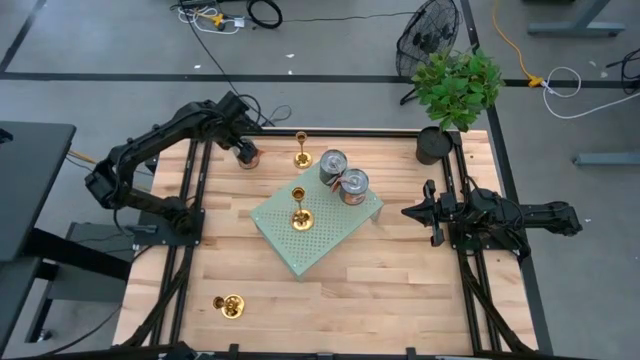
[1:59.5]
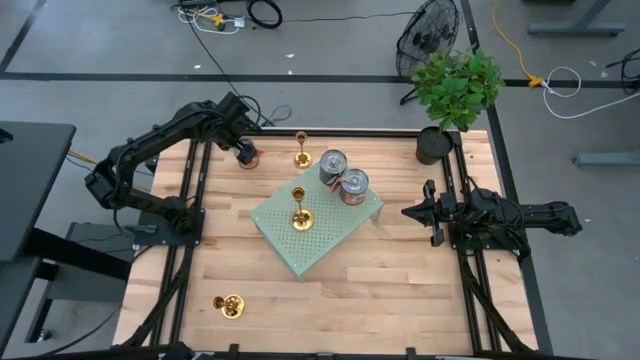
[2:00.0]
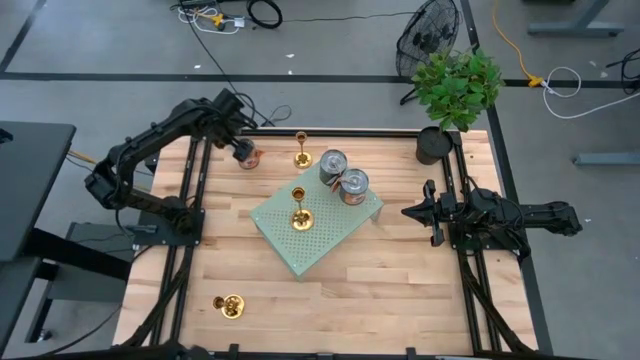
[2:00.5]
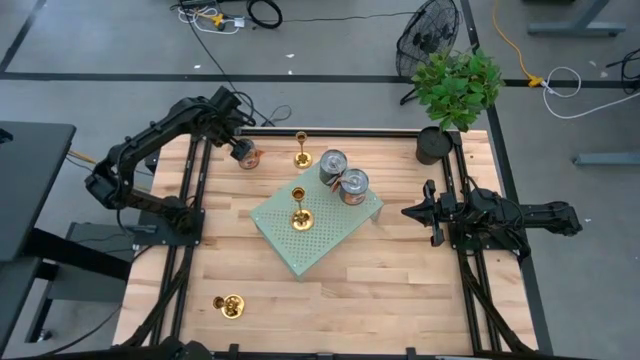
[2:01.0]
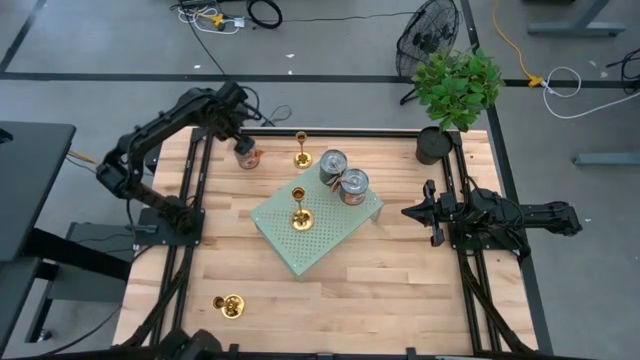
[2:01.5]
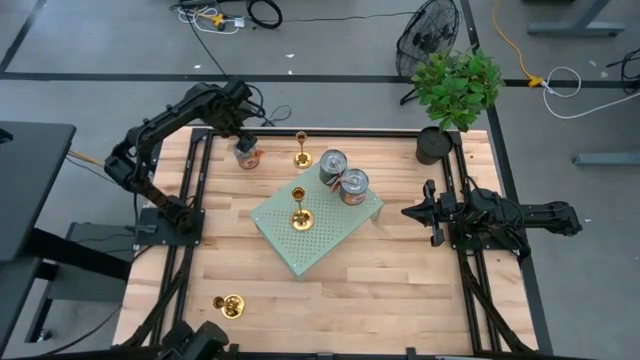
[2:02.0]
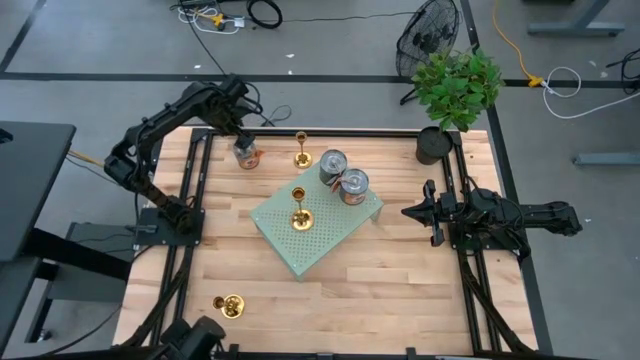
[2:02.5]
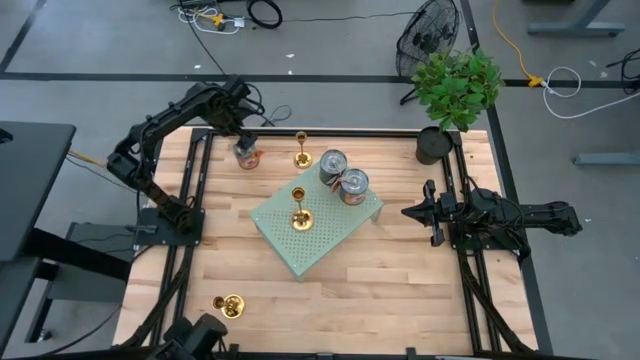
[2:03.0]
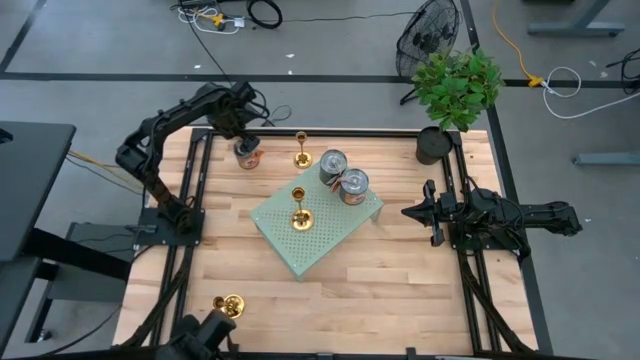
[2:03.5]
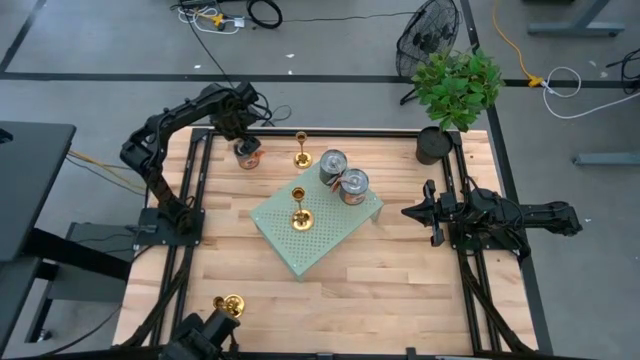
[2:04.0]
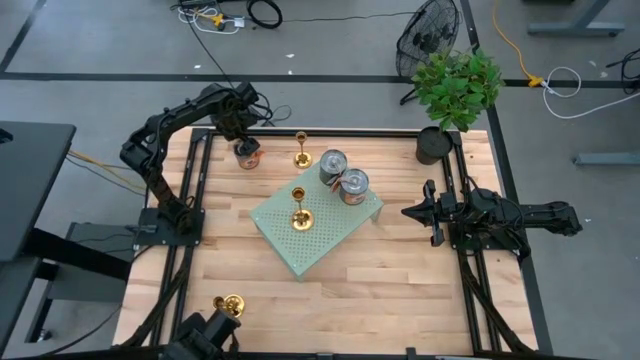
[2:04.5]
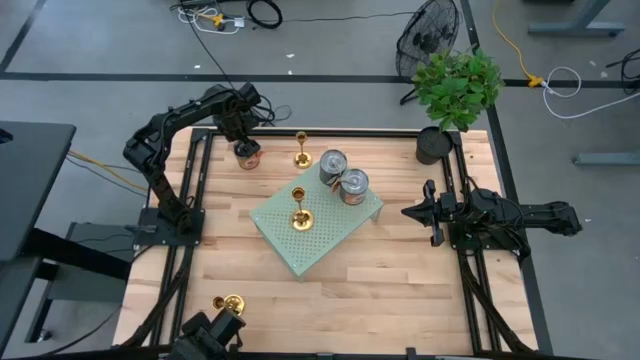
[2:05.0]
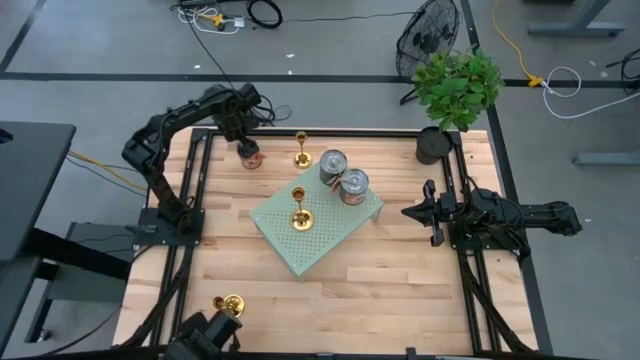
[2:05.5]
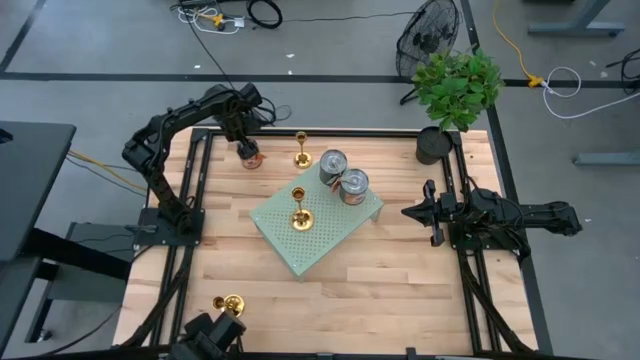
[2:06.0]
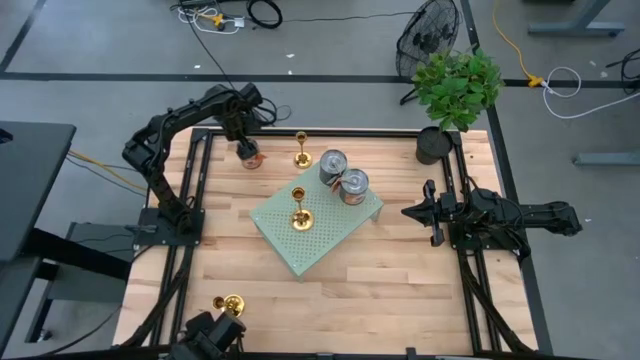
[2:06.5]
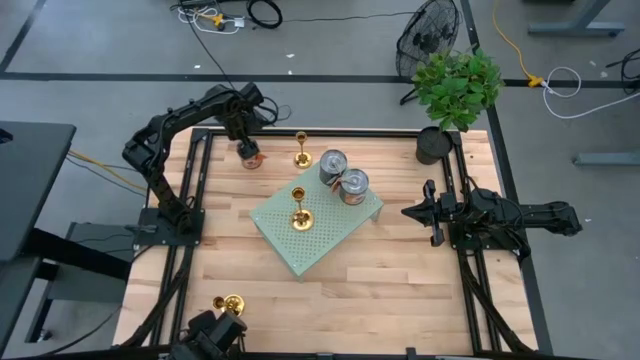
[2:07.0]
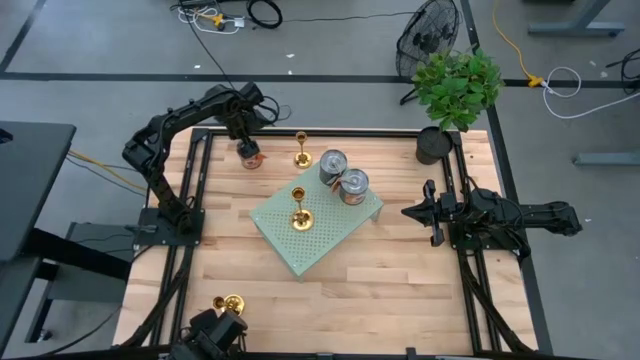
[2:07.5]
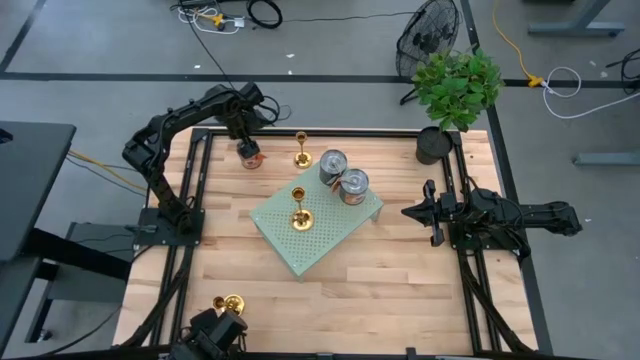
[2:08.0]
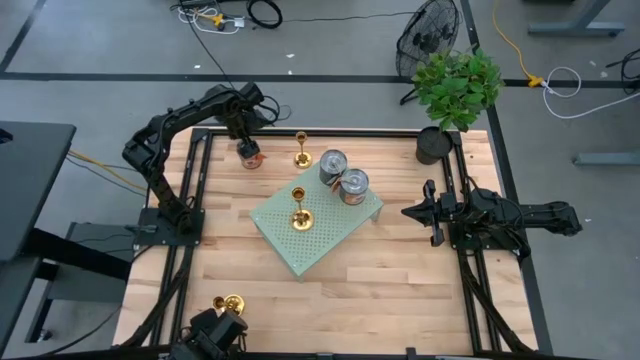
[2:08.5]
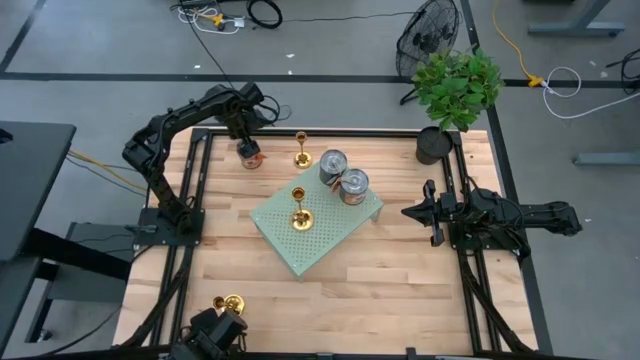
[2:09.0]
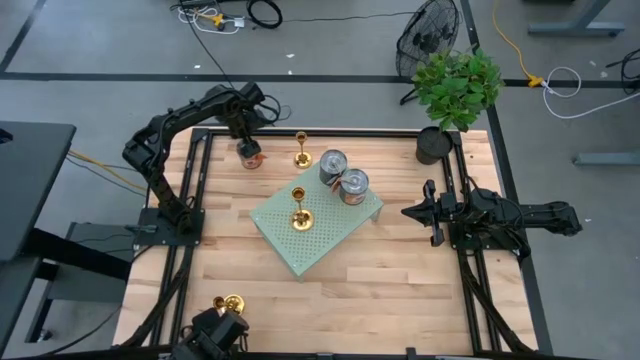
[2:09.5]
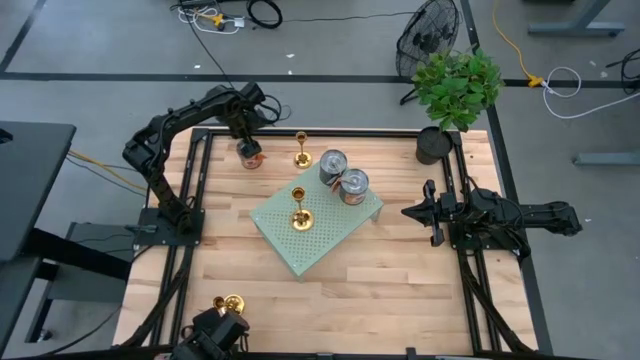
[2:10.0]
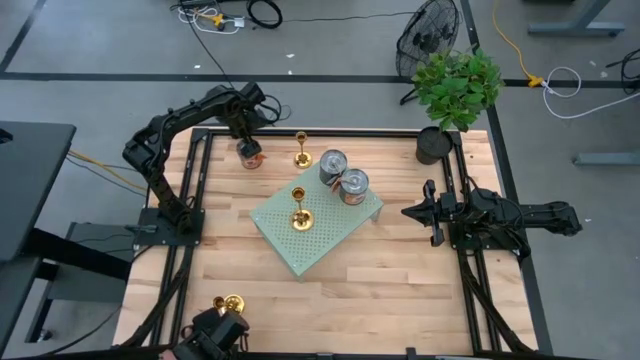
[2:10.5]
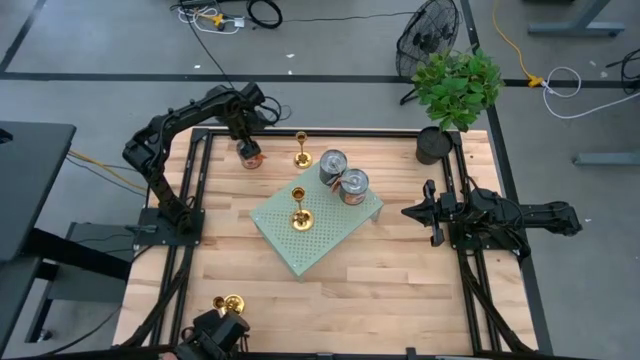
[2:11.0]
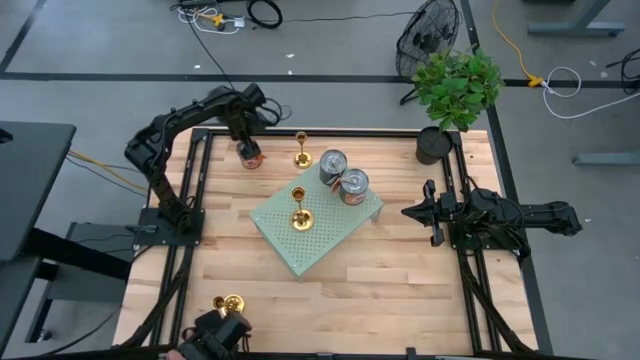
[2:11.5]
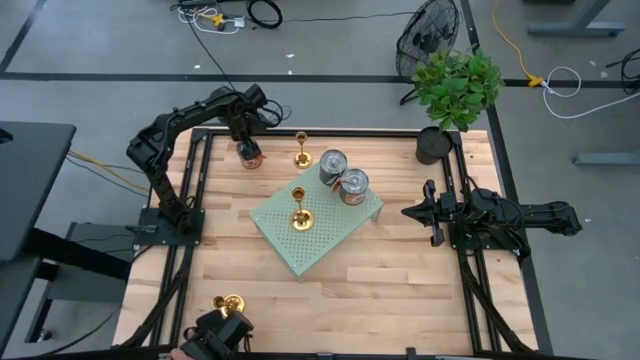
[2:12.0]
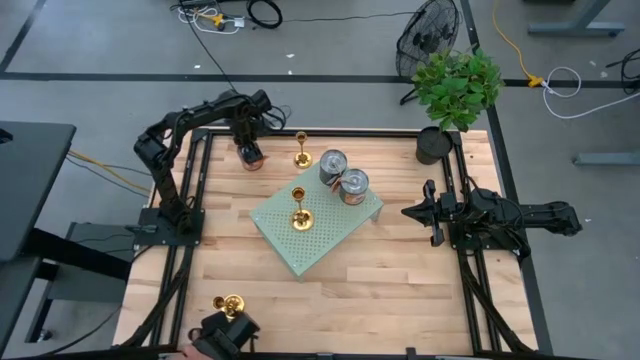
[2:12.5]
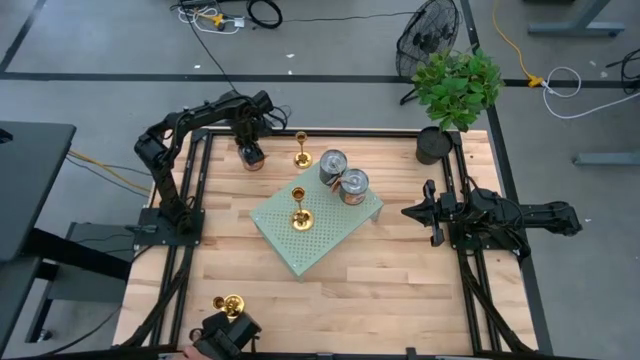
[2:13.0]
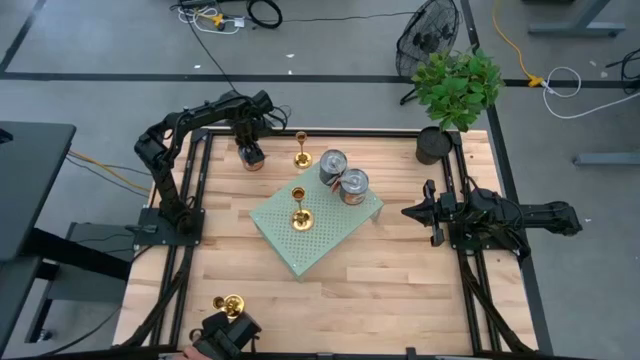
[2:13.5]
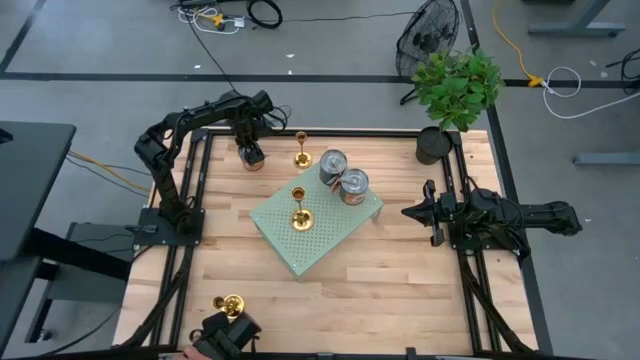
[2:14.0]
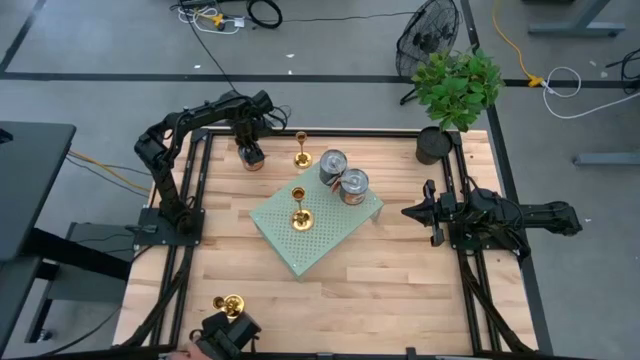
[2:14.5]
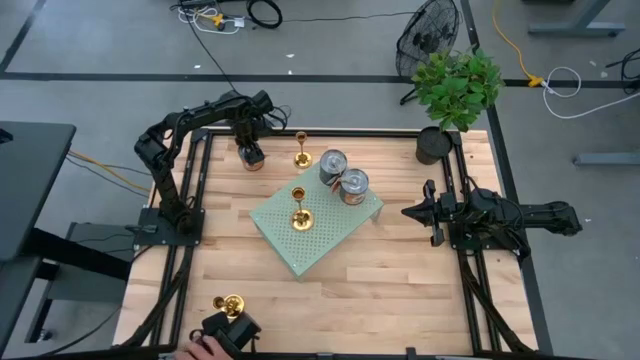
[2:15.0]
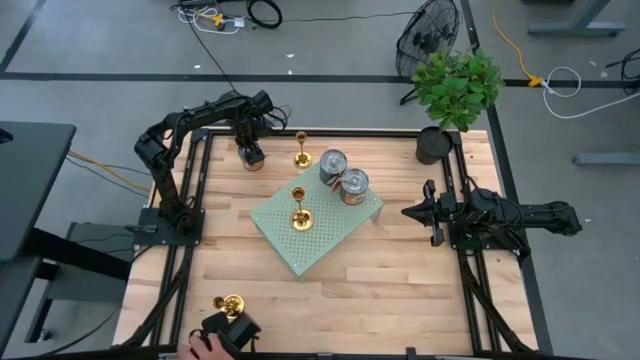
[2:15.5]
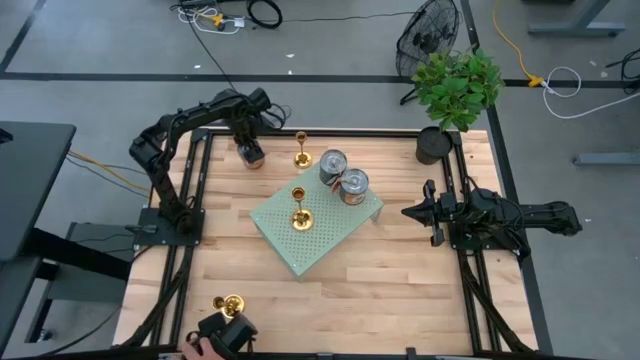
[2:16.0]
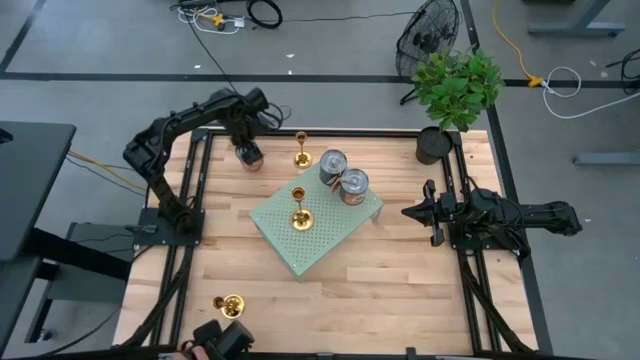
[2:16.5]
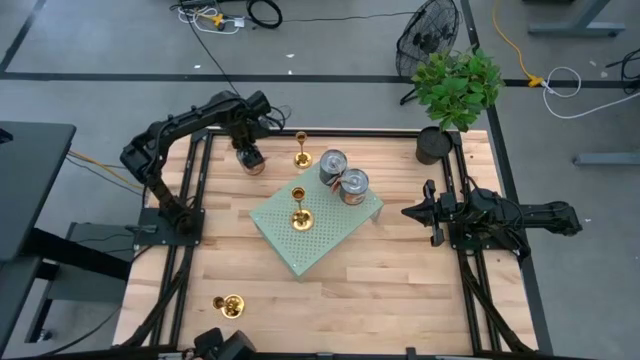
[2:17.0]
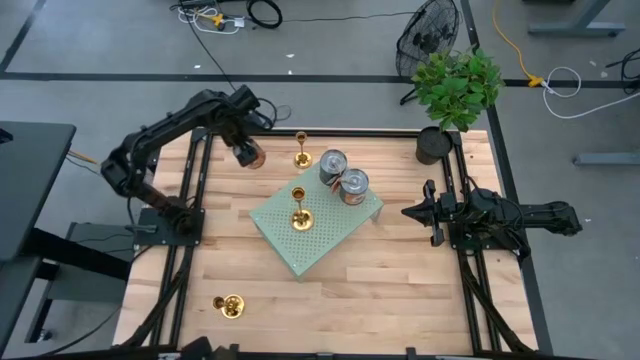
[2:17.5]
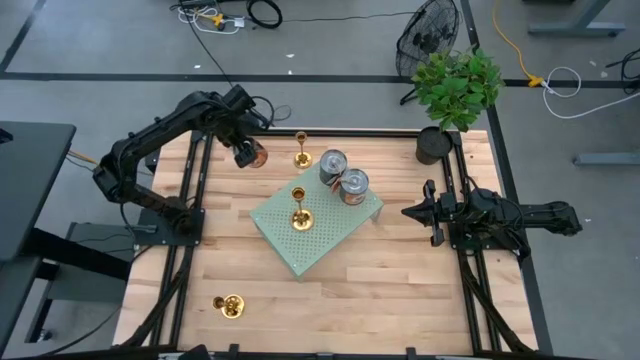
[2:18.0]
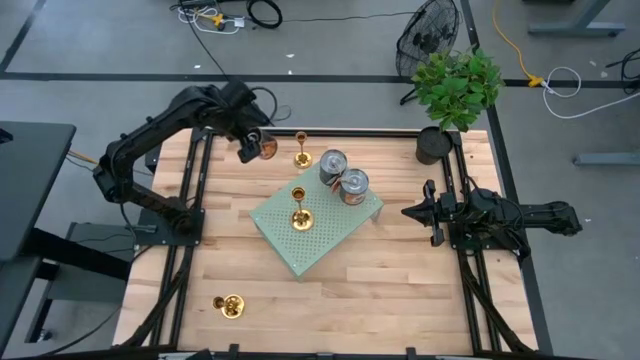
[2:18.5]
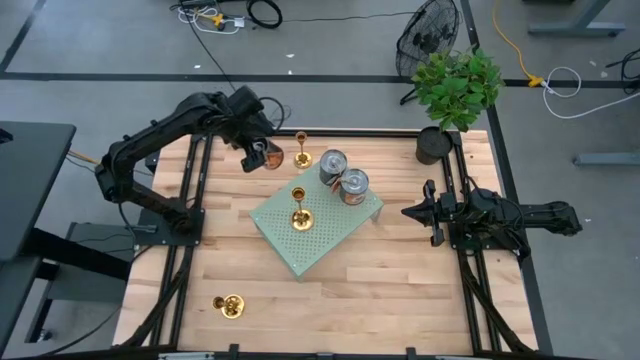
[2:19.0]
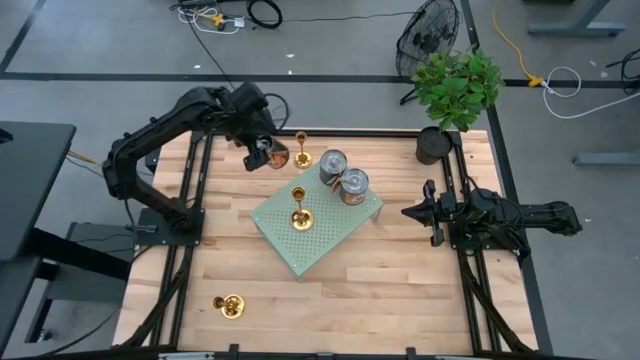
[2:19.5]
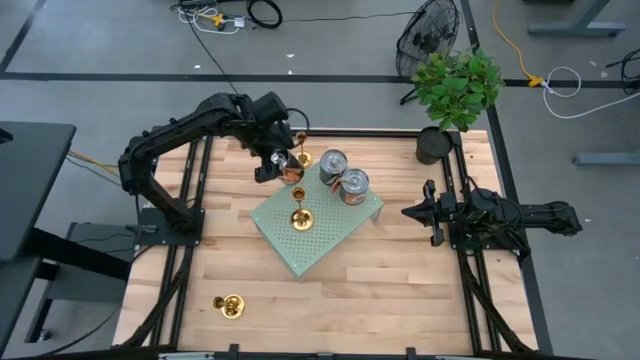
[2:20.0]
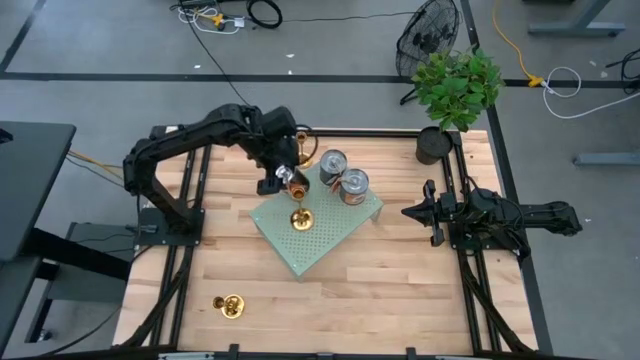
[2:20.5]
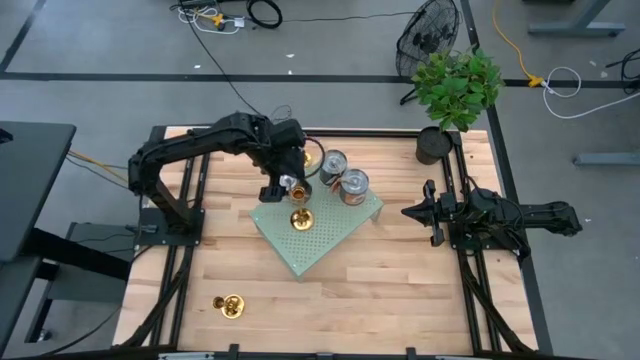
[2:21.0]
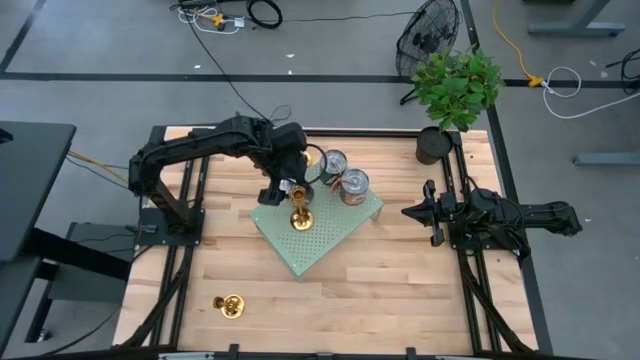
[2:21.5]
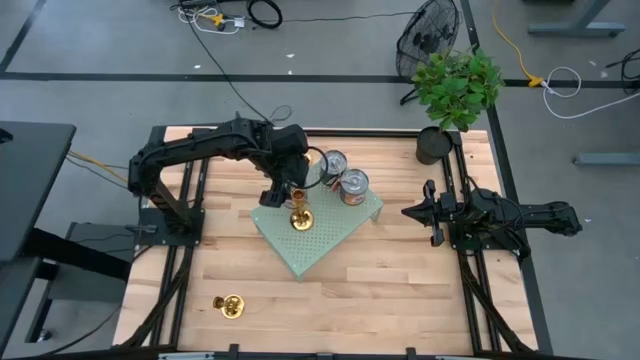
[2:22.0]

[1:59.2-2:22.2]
Task: Pick & Place candle stick holders
Put the silver scented candle on the shelf
